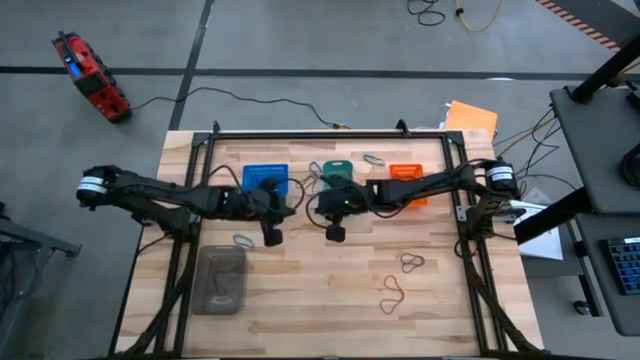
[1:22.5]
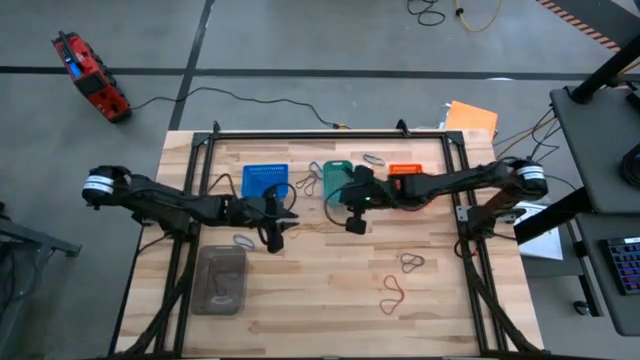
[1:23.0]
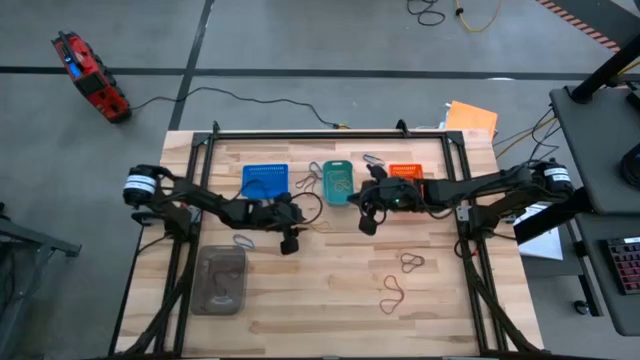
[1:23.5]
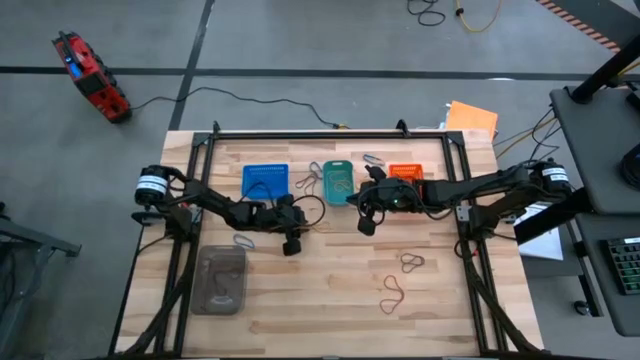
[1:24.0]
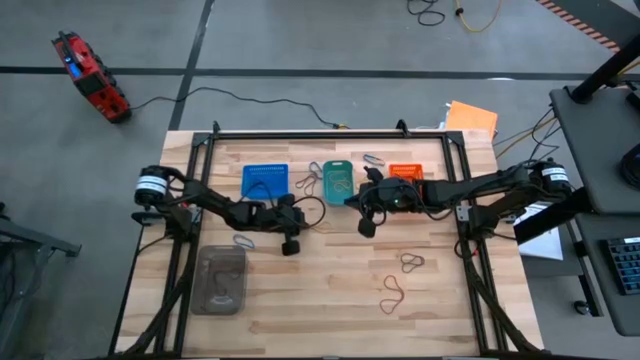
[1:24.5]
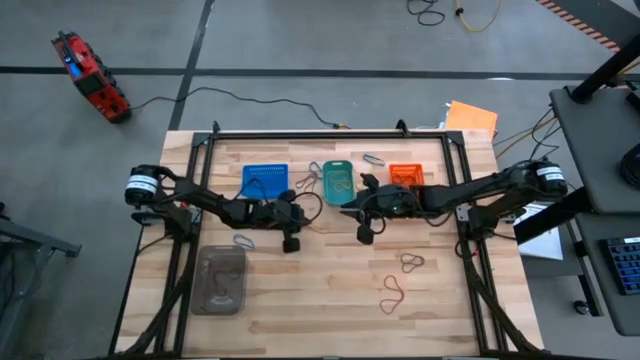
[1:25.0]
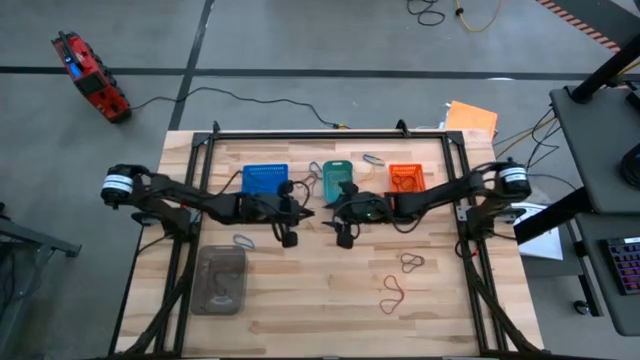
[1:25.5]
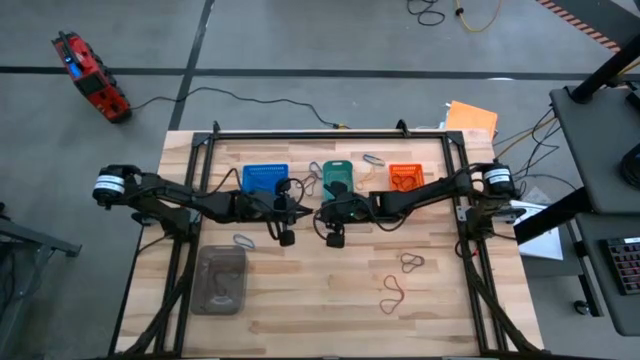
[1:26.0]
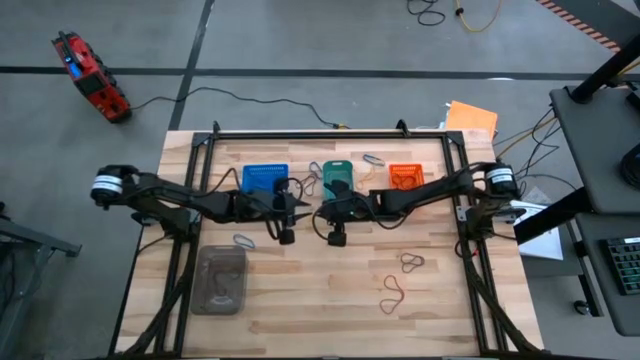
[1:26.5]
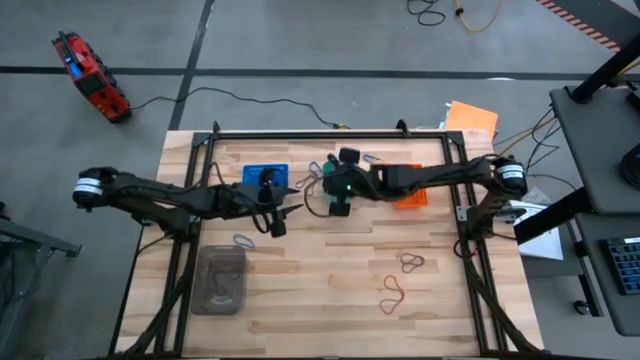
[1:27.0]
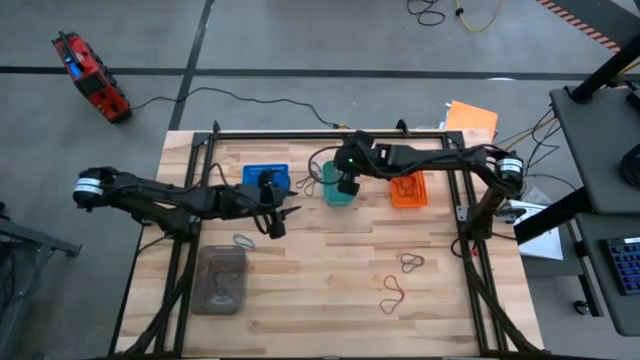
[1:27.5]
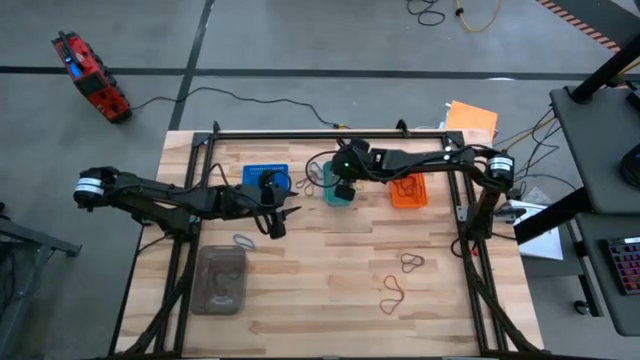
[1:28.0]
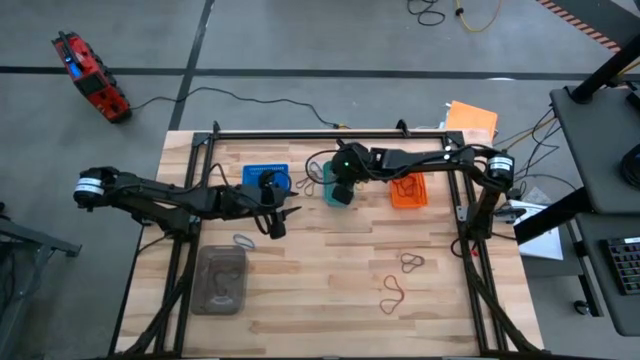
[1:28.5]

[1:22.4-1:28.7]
Task: Sort rubber bands into baskets
Put the left yellow rubber band into the green bin

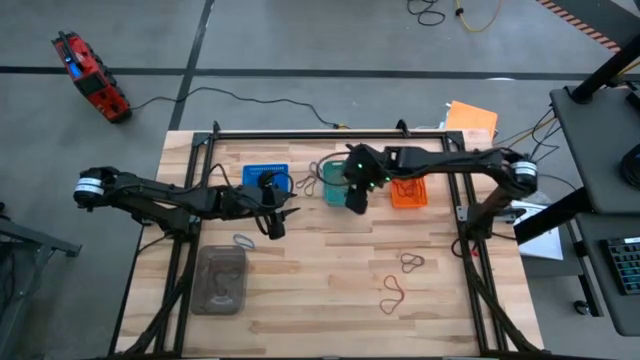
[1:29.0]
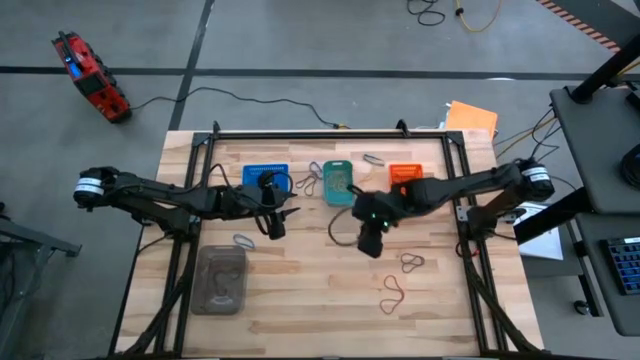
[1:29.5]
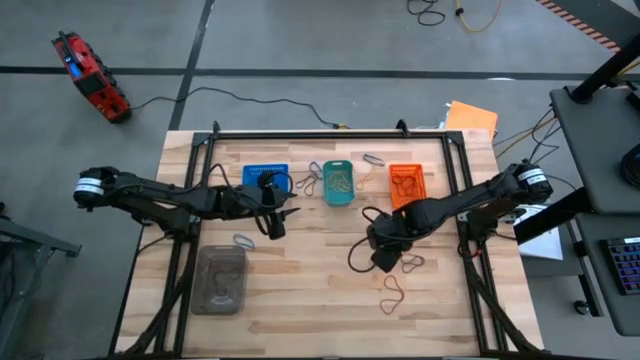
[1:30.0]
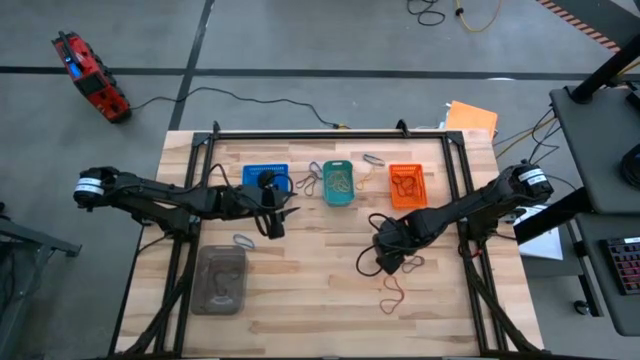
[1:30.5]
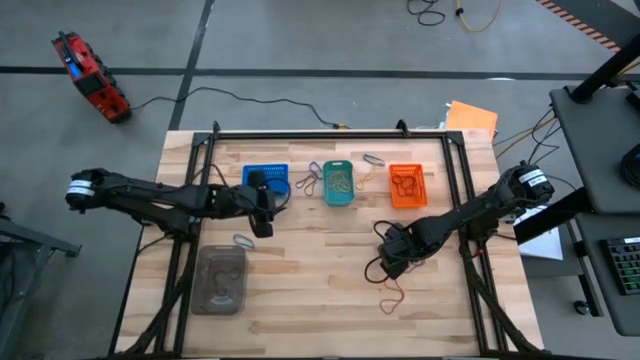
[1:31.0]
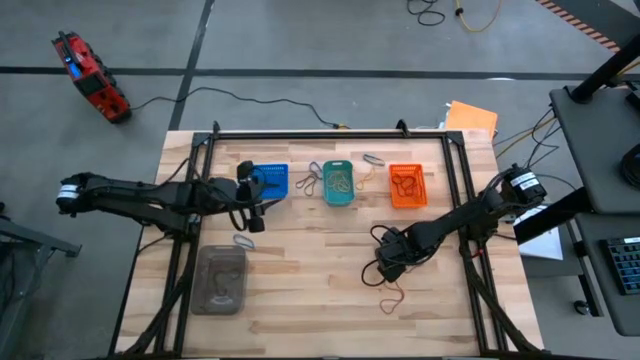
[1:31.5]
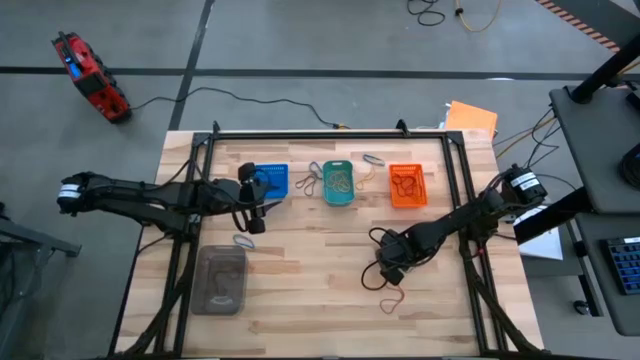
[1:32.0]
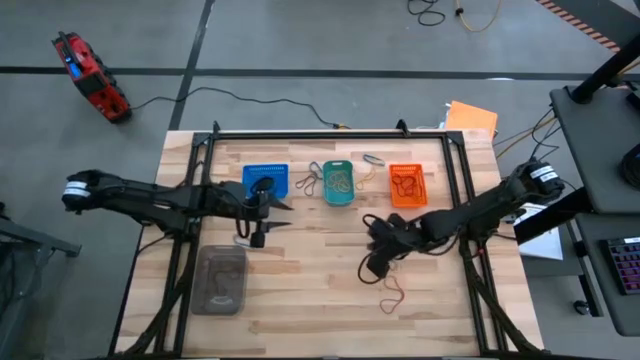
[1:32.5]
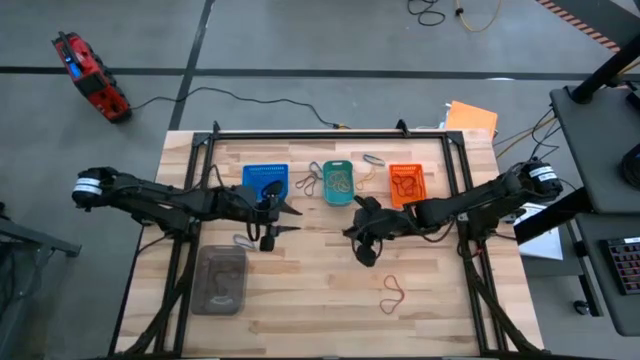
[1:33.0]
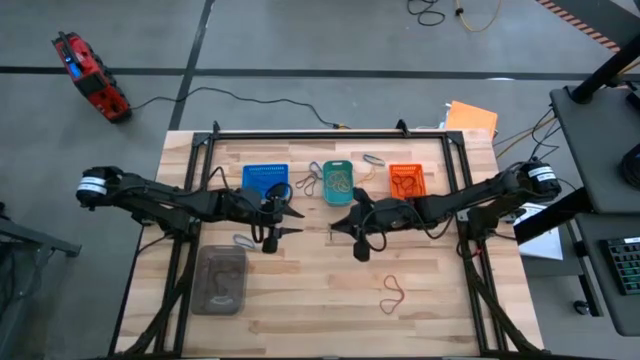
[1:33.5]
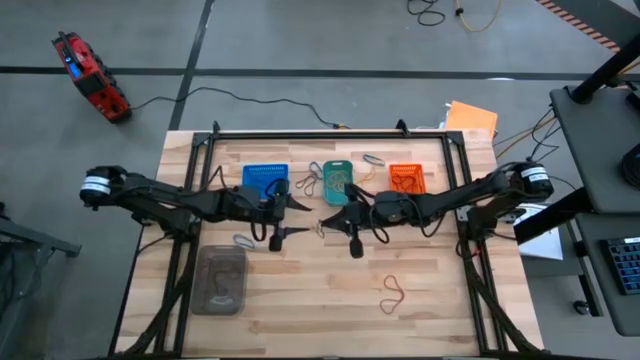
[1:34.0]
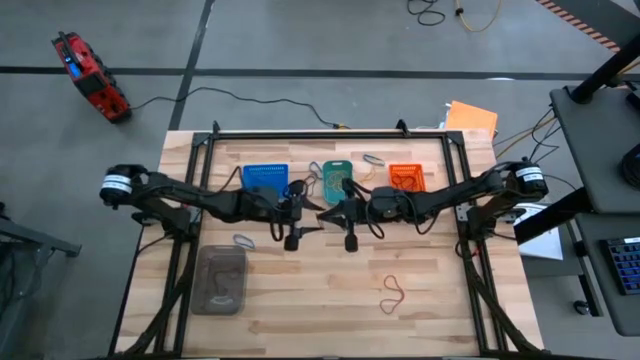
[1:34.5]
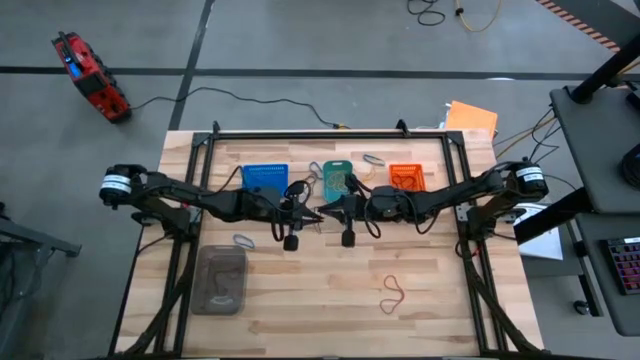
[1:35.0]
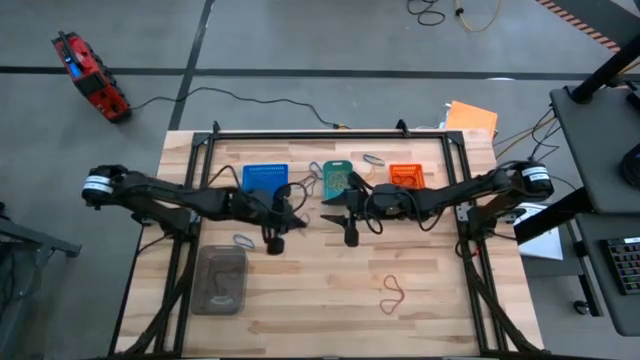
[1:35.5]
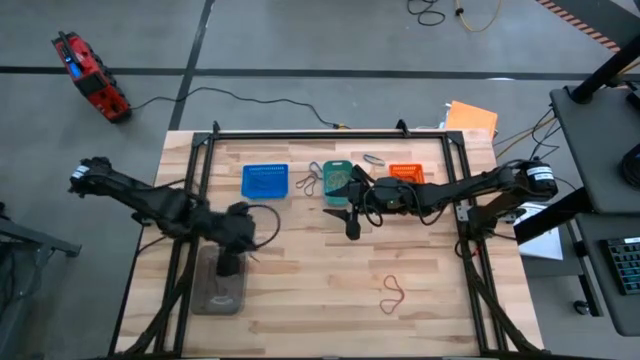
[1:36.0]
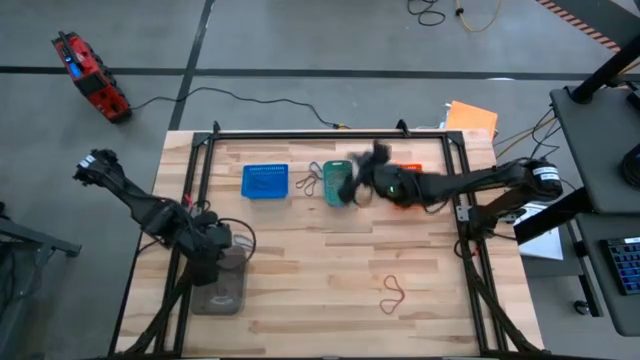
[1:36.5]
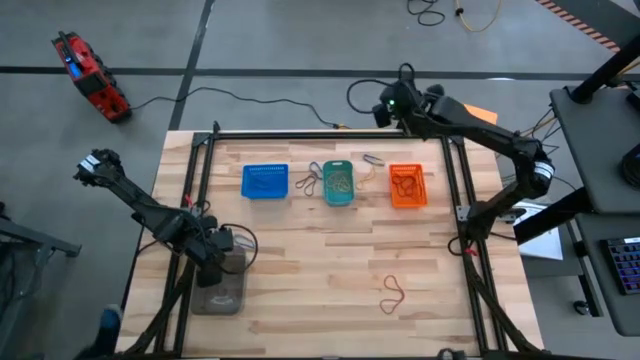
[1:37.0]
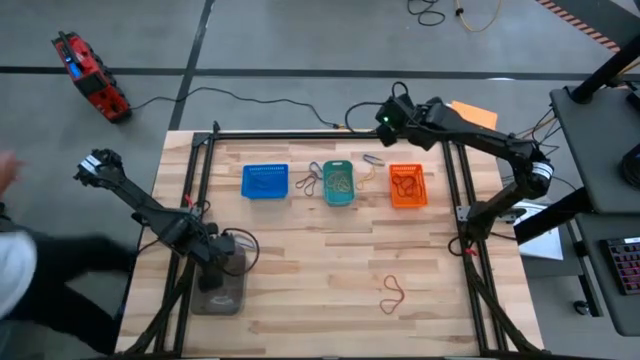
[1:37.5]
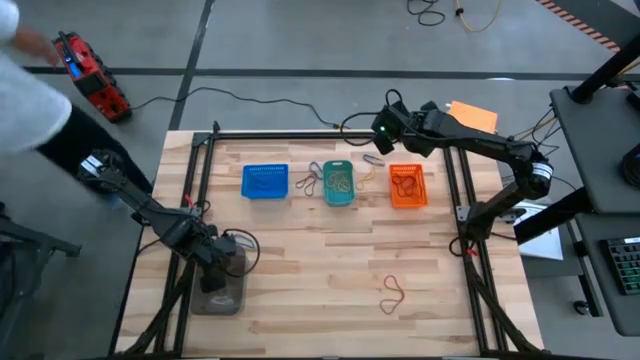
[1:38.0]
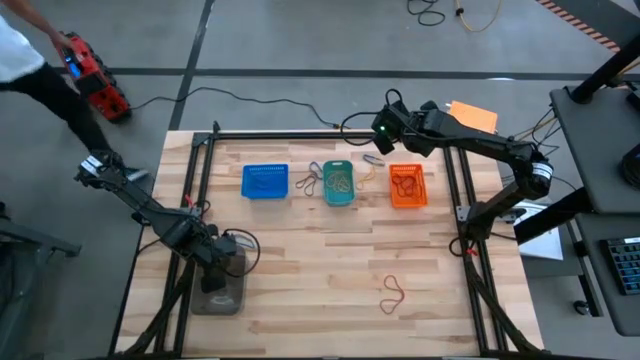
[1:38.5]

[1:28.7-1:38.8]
Put the right black rubber band into the black bin

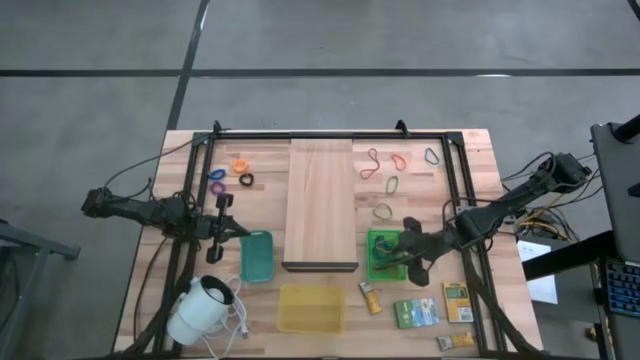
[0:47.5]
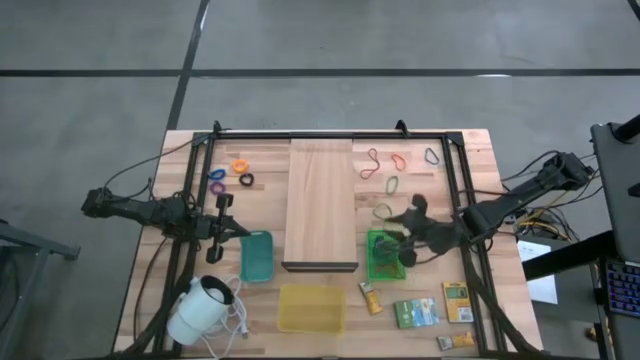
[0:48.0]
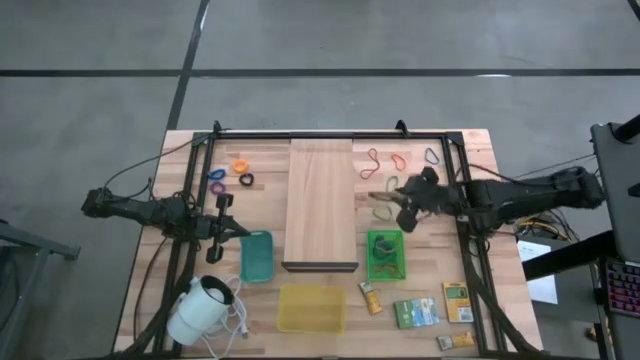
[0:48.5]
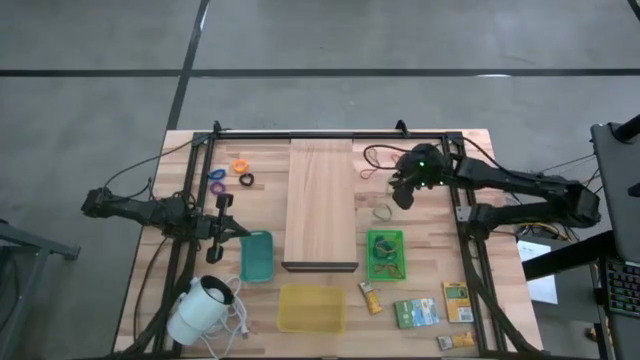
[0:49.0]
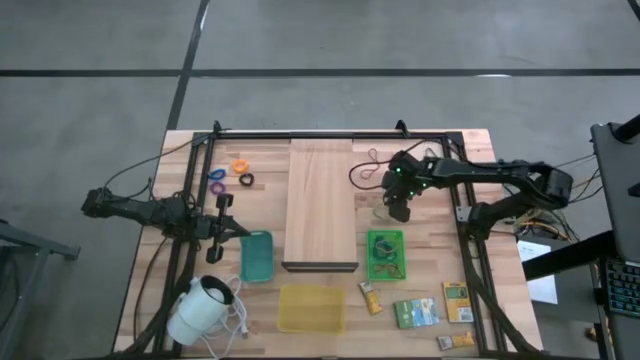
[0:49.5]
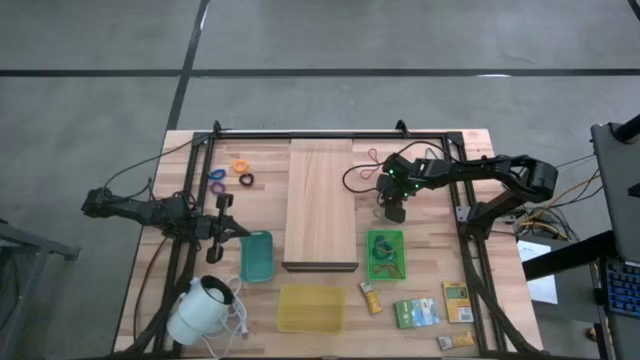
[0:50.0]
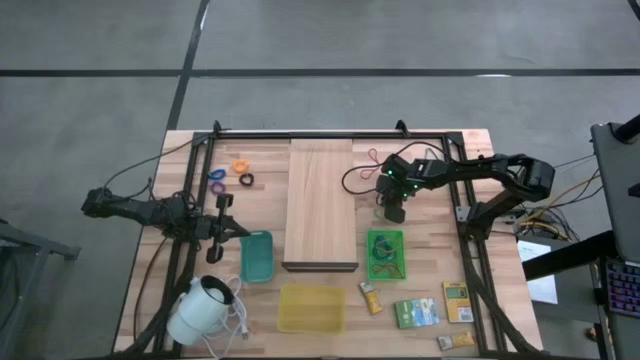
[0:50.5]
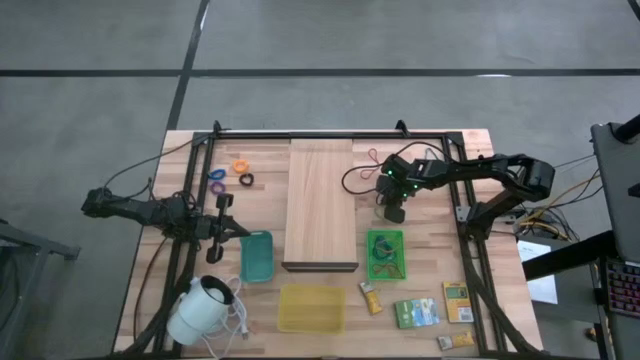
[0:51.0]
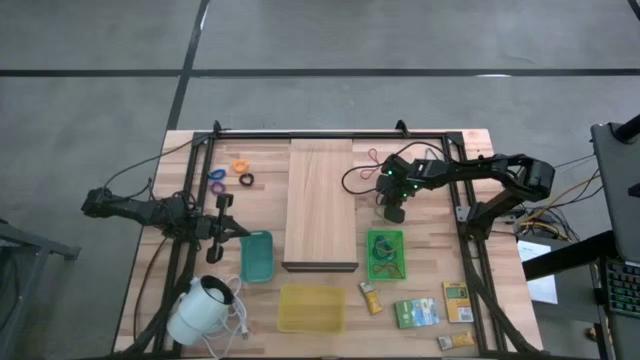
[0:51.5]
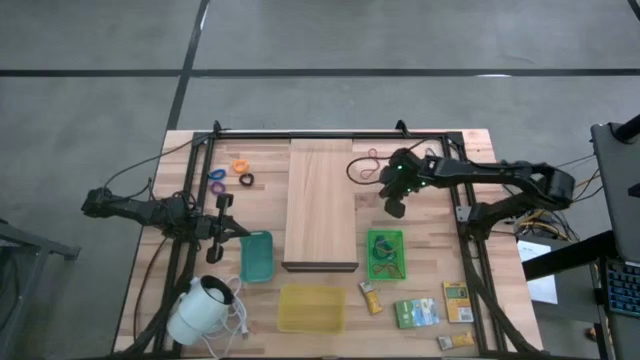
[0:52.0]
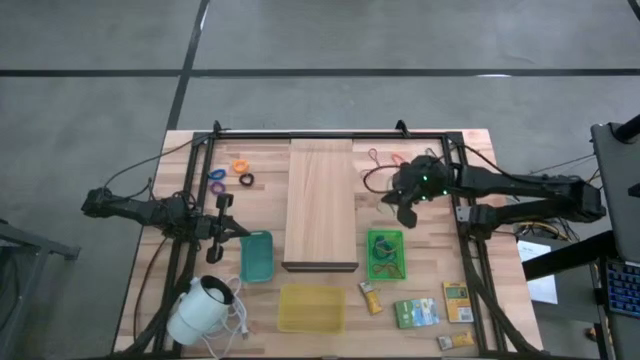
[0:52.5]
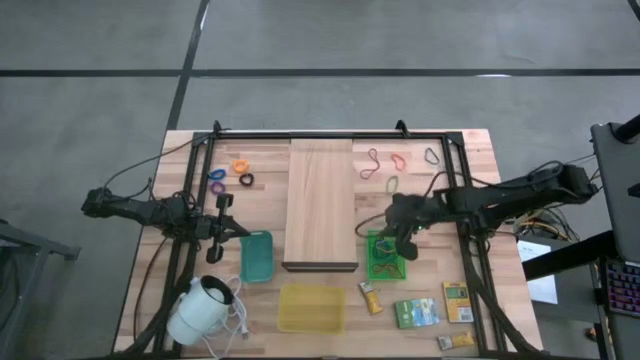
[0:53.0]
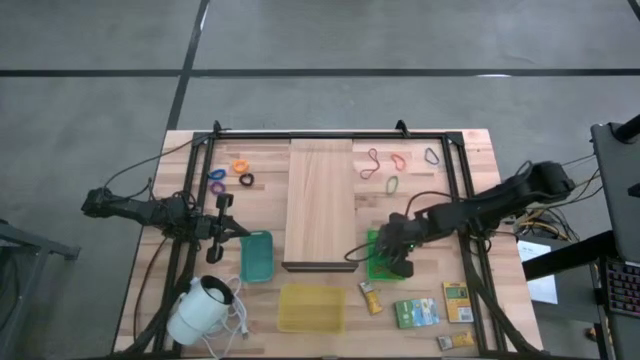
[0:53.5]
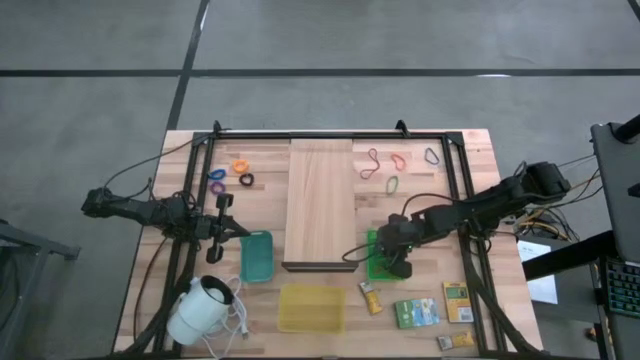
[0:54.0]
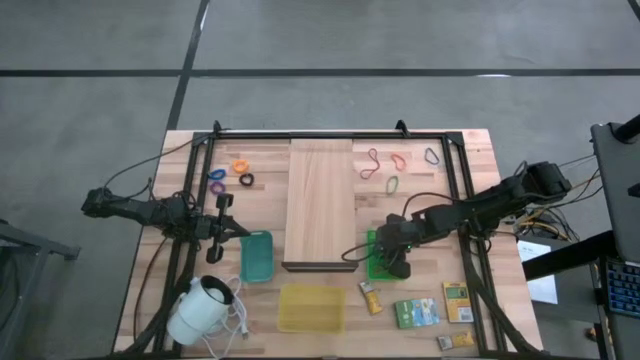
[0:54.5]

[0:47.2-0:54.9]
Task: Pick & Place Office Desk Supplies
Put the bottom green rubber band into the green bin
